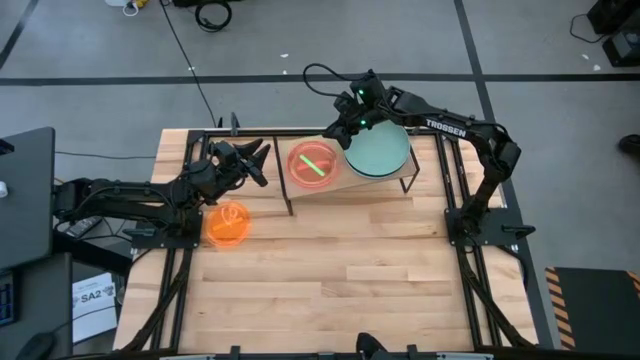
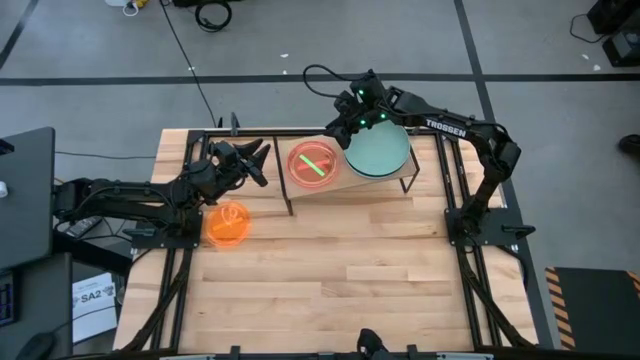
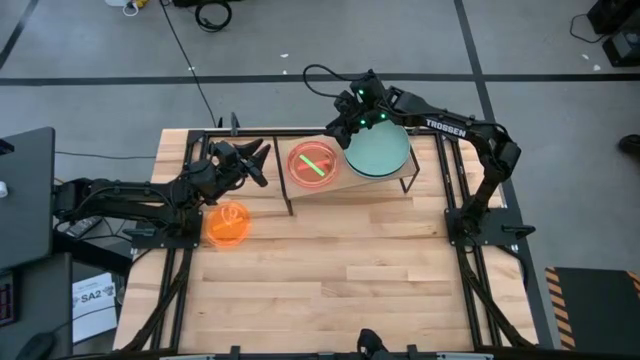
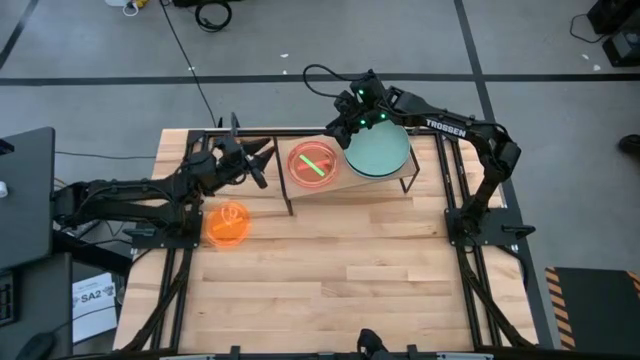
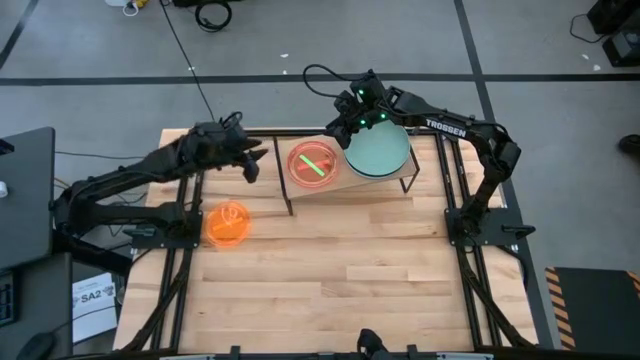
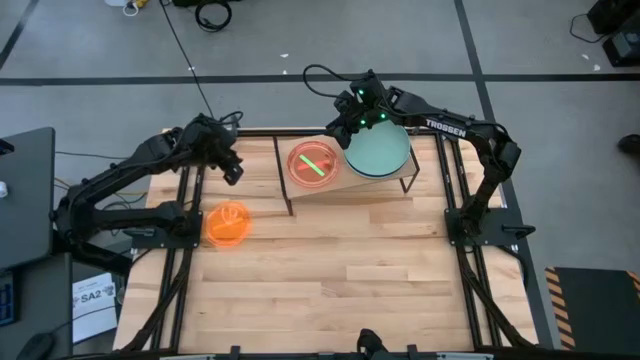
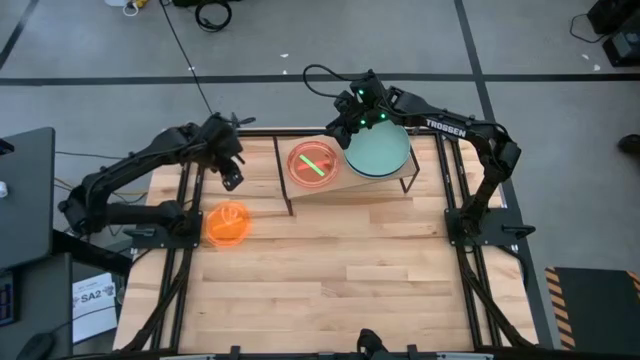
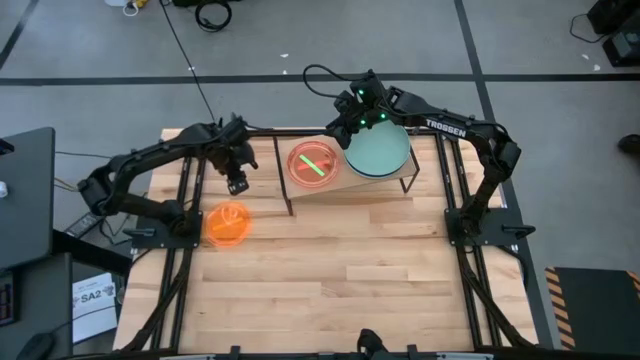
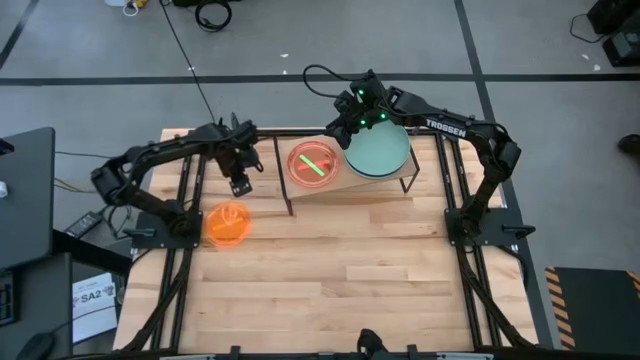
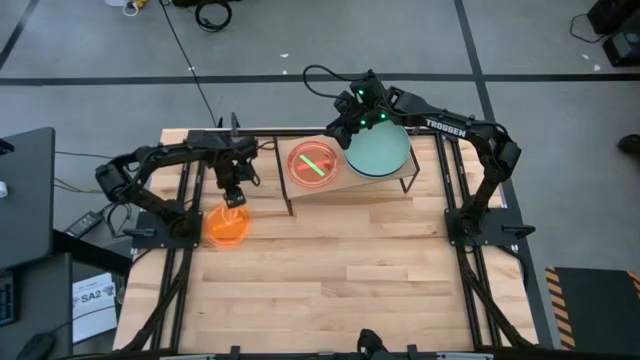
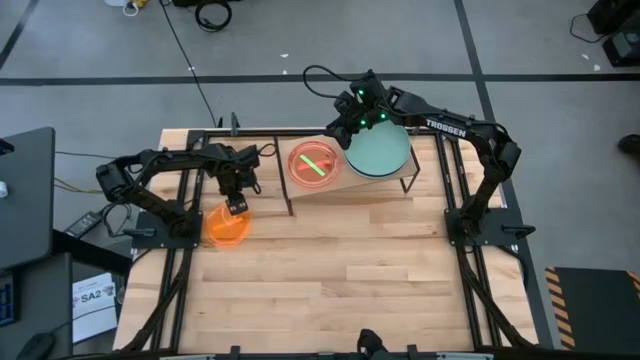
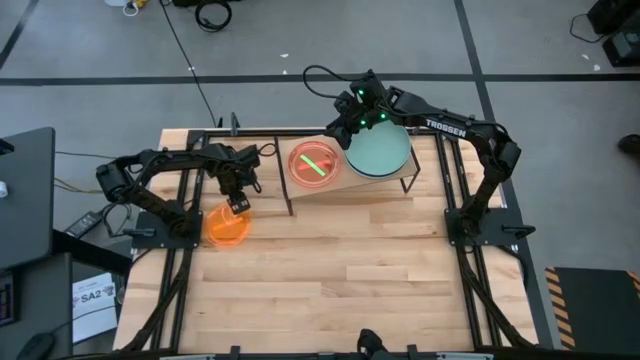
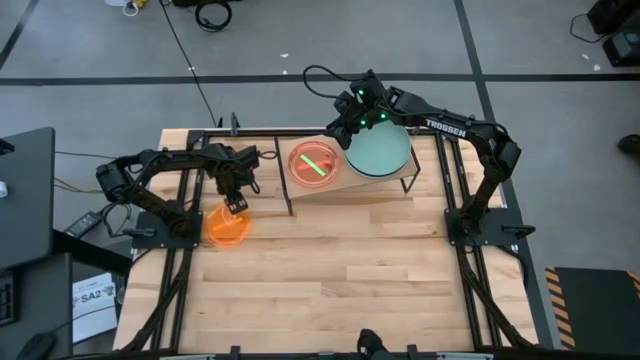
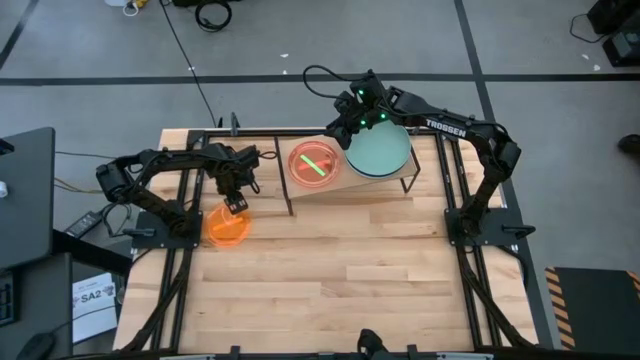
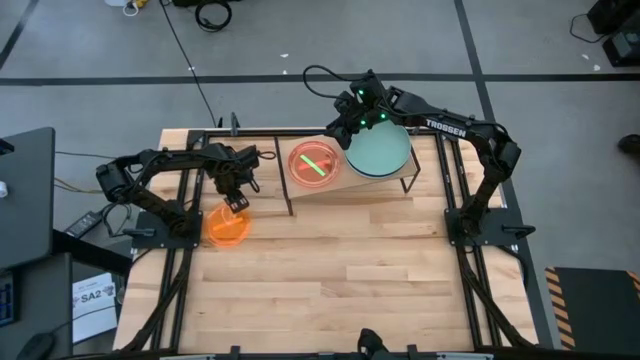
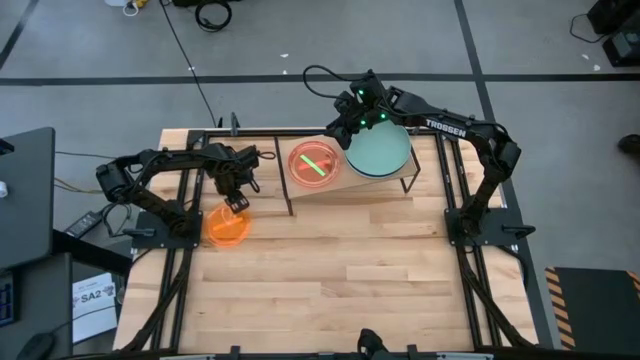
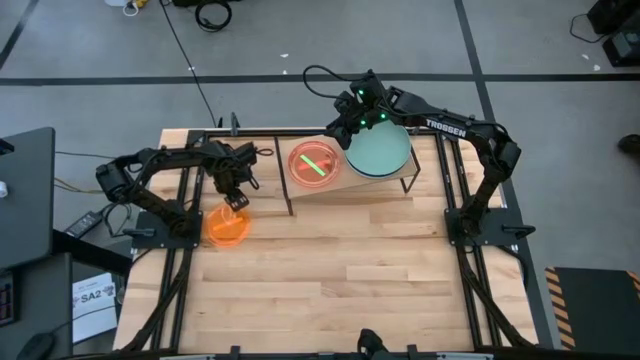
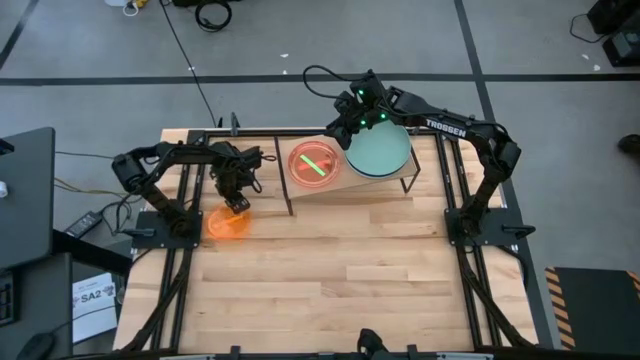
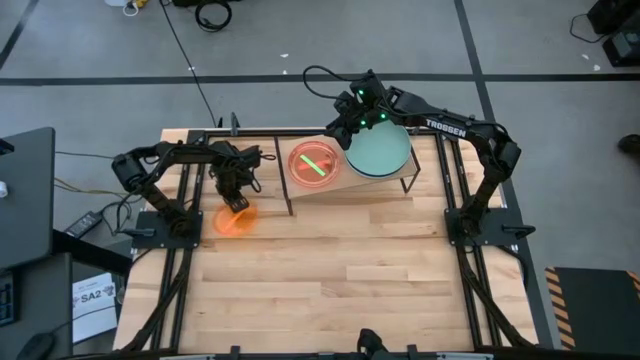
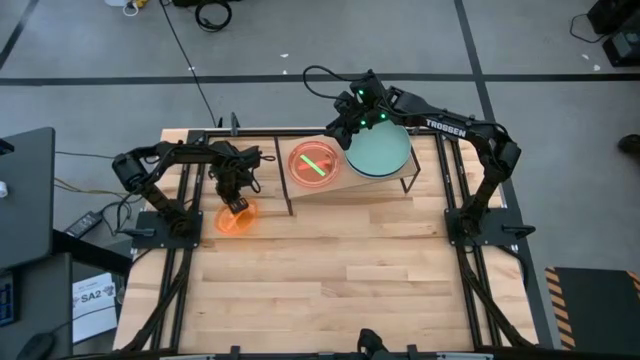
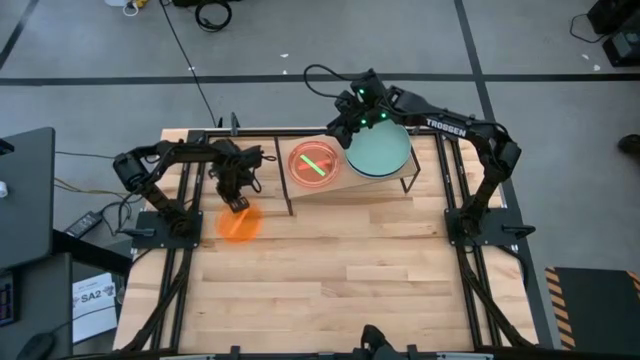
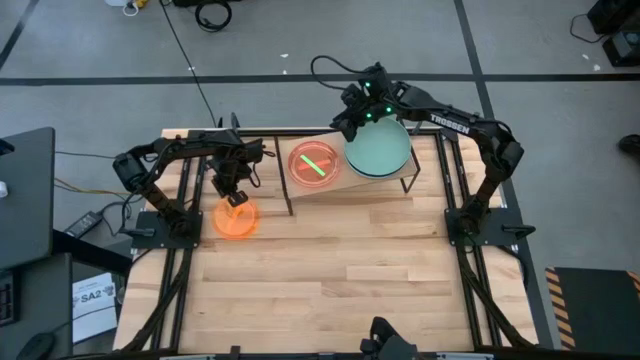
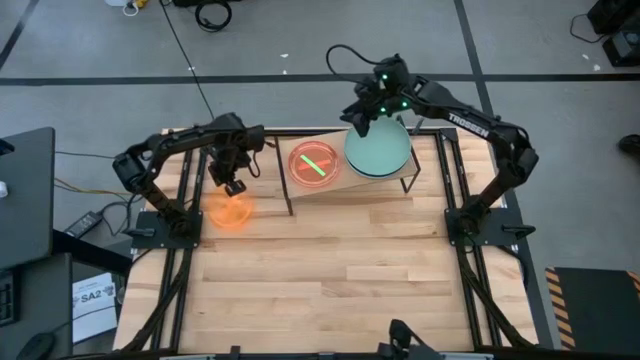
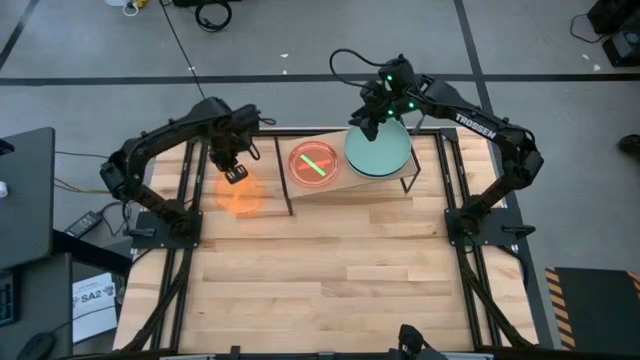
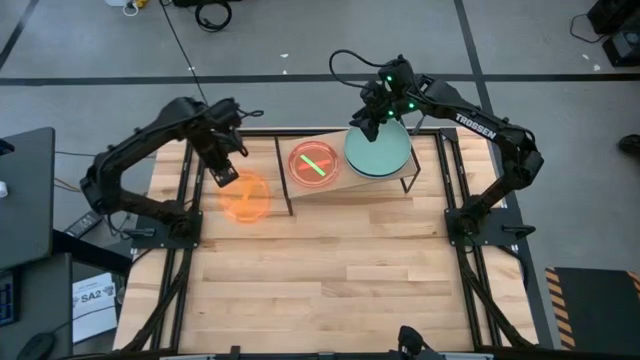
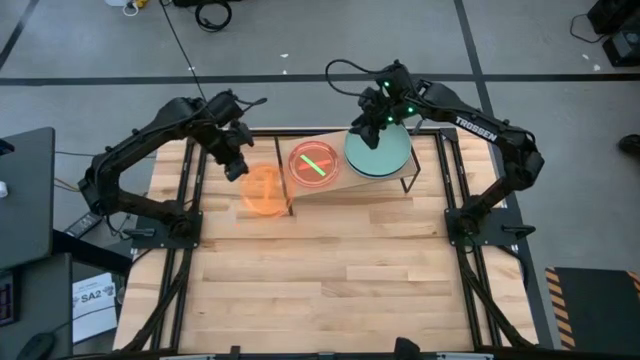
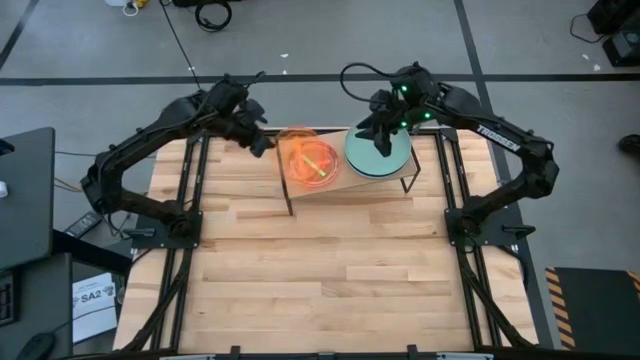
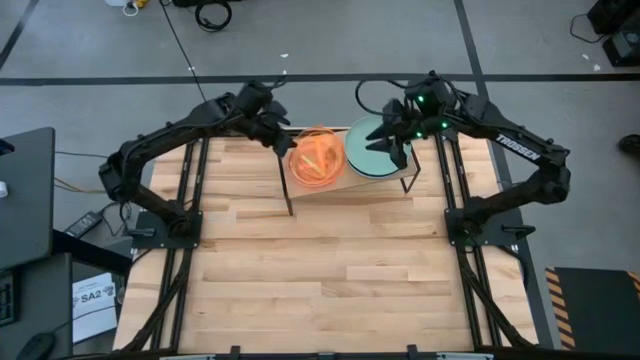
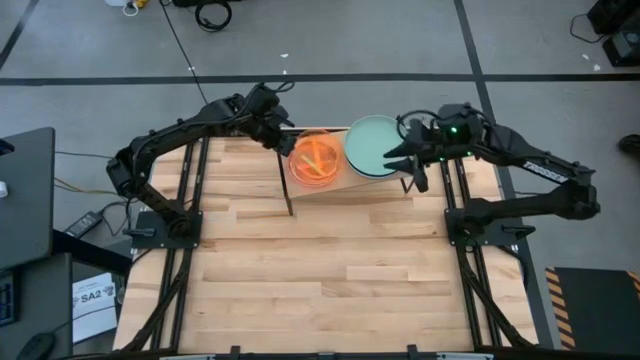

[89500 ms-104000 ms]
Task: Place and stack plates onto a shelf
Stack the small orange plate on top of the small green plate

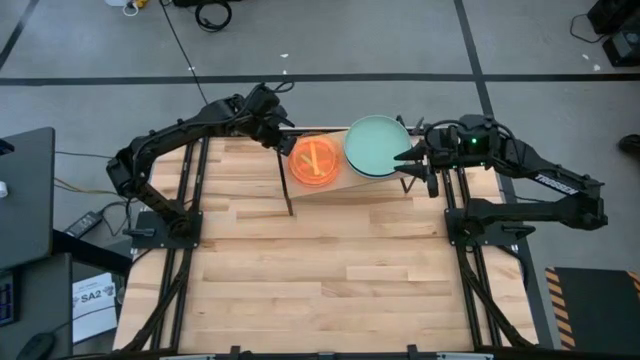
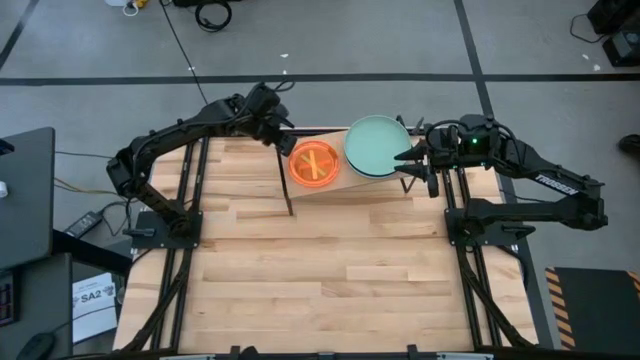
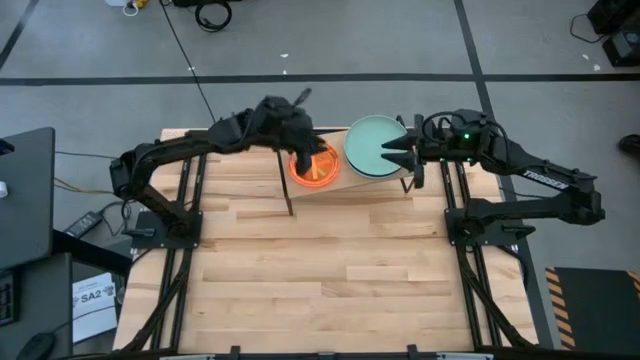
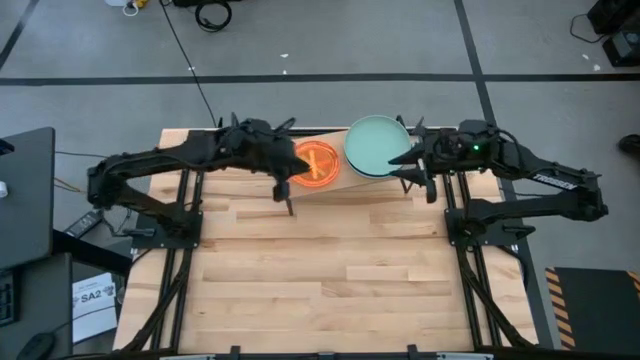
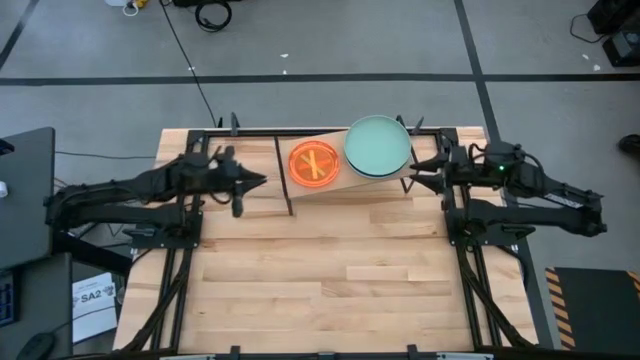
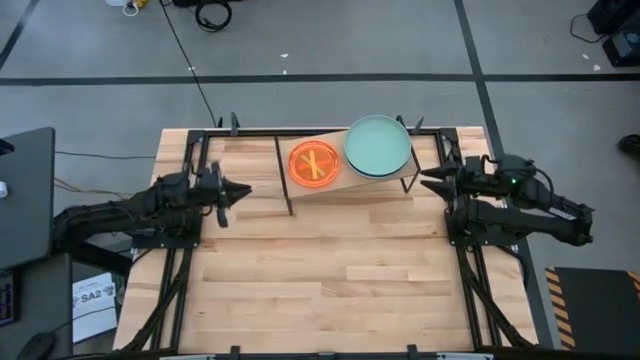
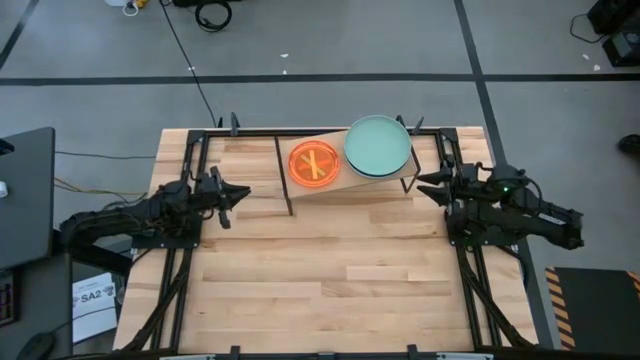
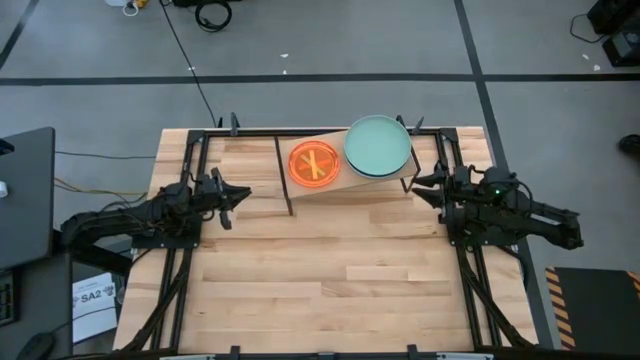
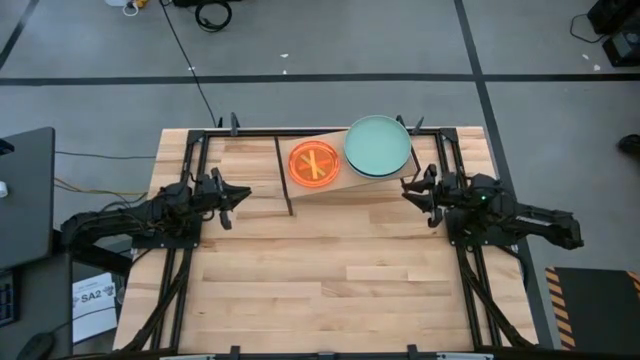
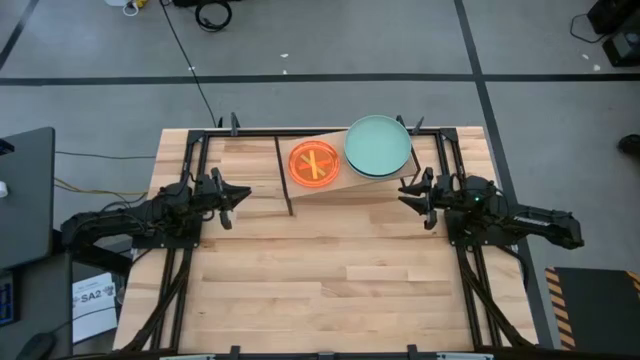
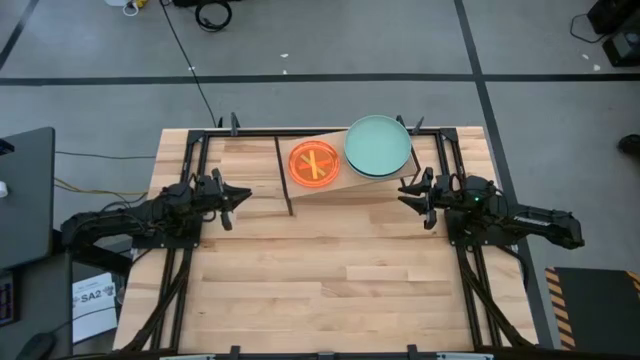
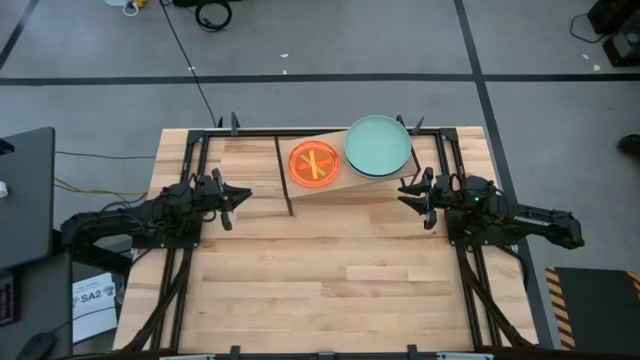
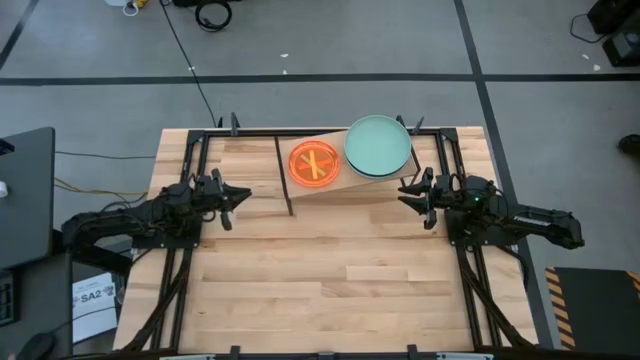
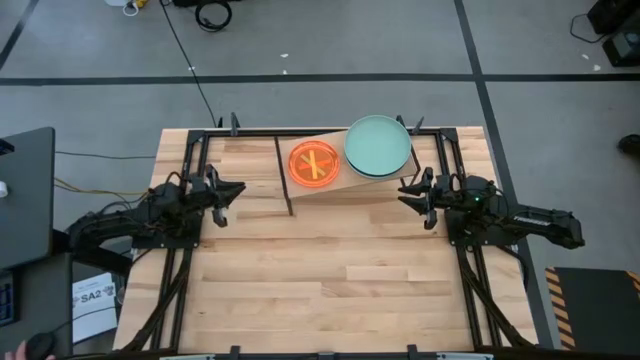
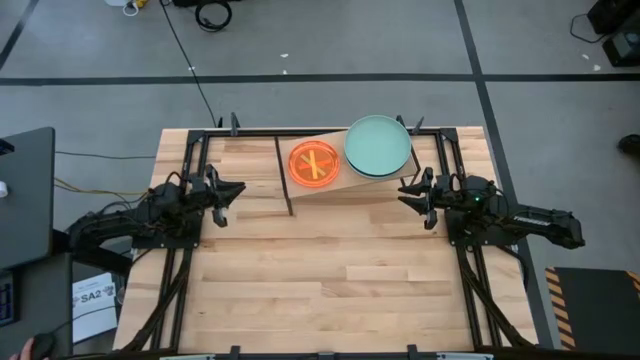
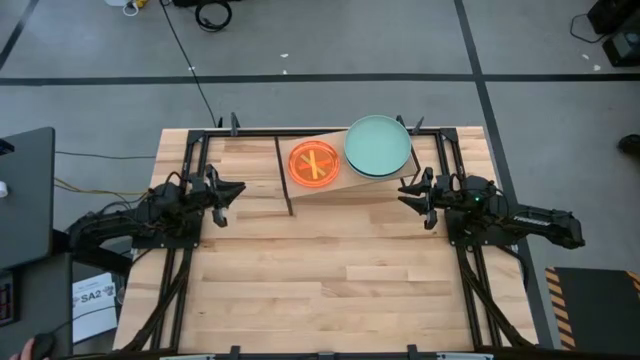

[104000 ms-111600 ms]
Return to Home Position
